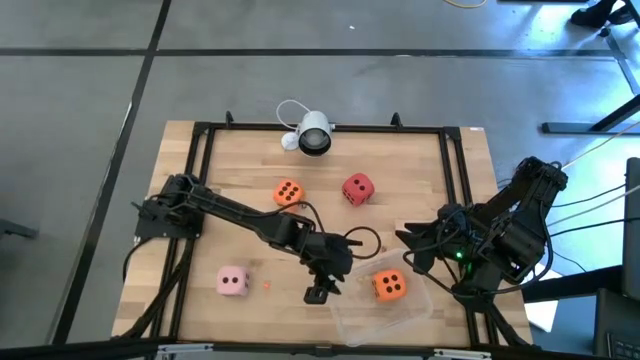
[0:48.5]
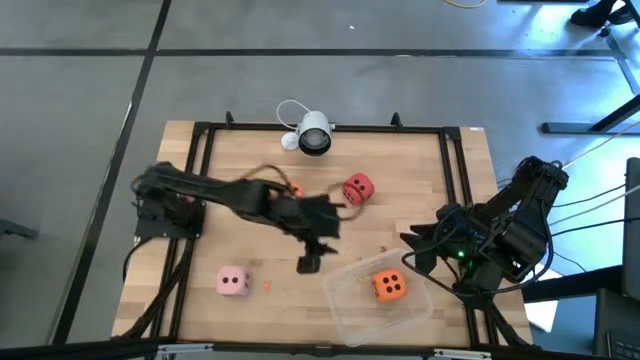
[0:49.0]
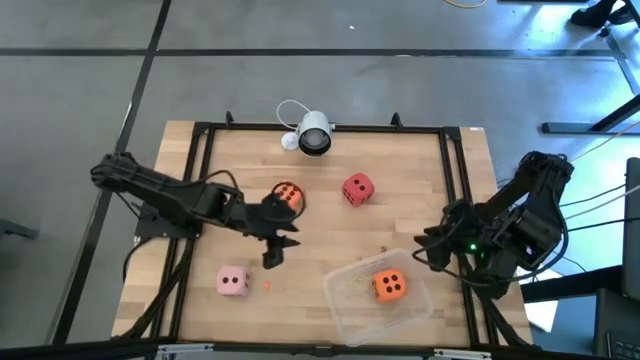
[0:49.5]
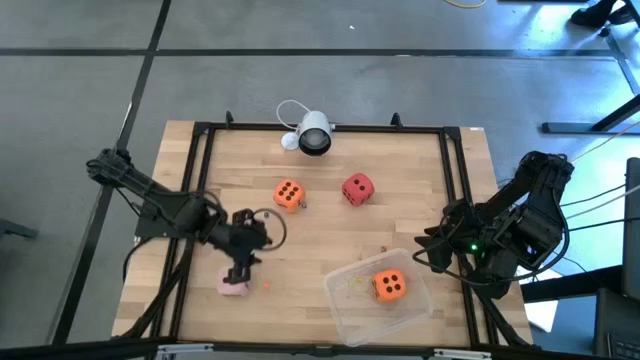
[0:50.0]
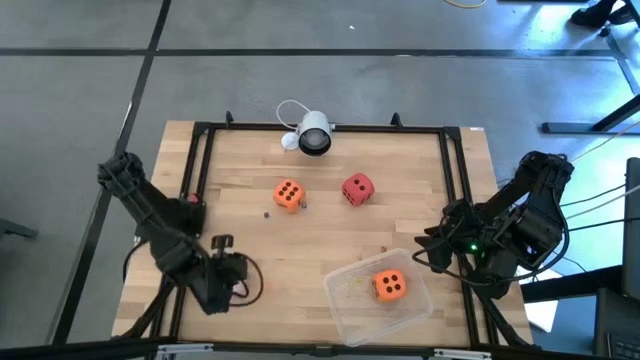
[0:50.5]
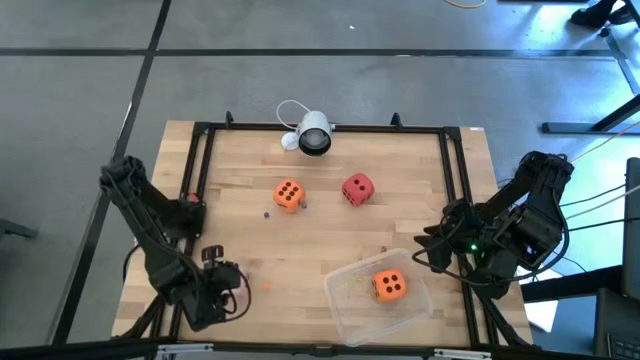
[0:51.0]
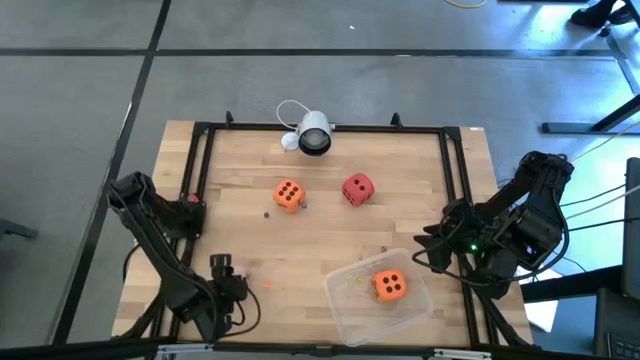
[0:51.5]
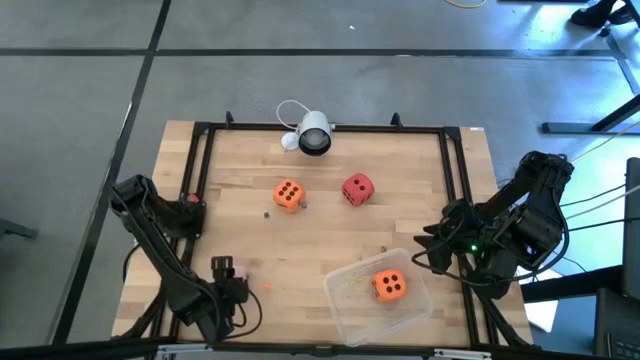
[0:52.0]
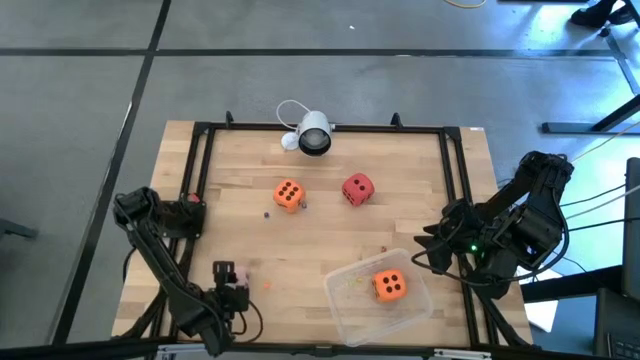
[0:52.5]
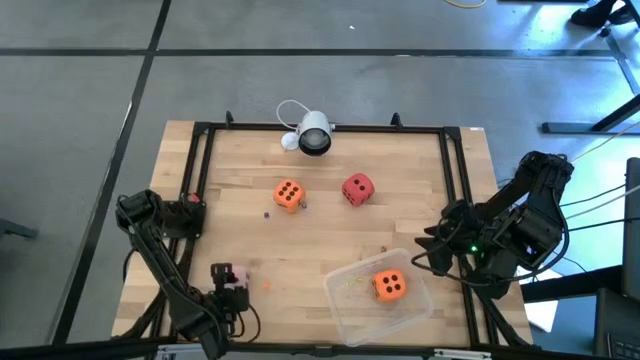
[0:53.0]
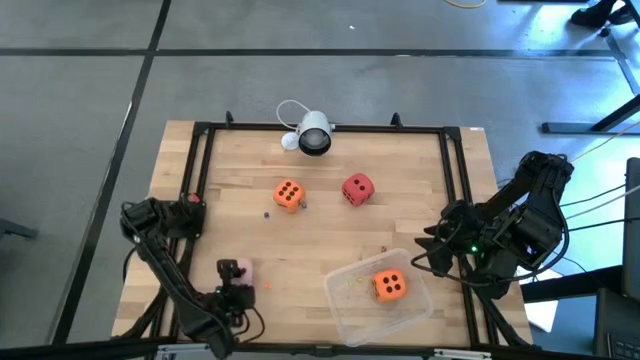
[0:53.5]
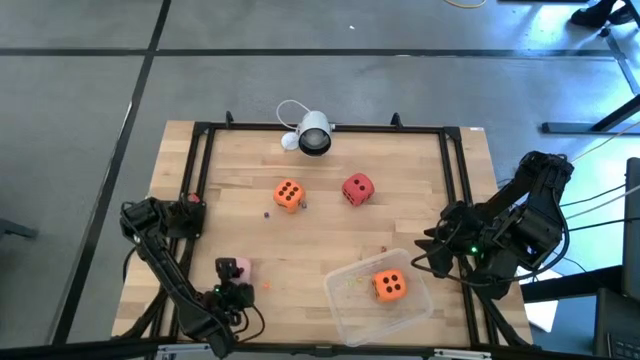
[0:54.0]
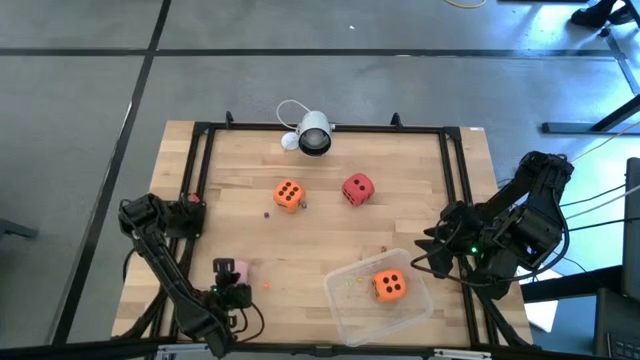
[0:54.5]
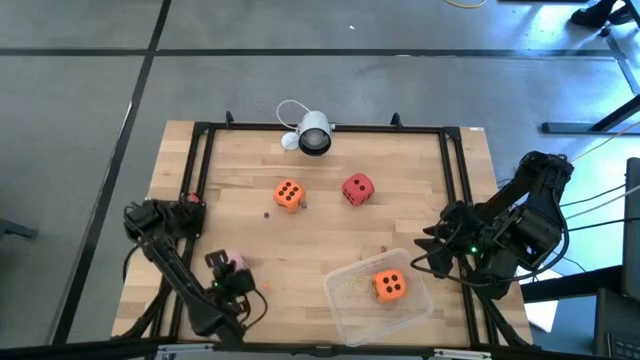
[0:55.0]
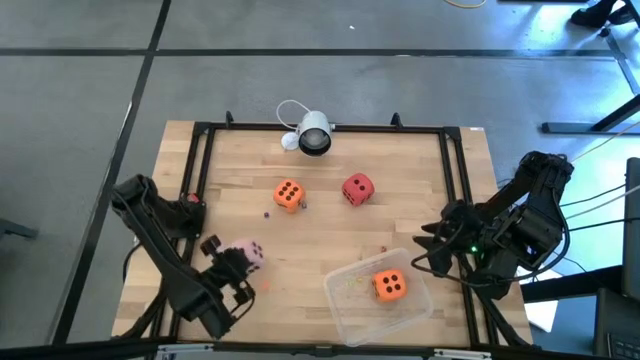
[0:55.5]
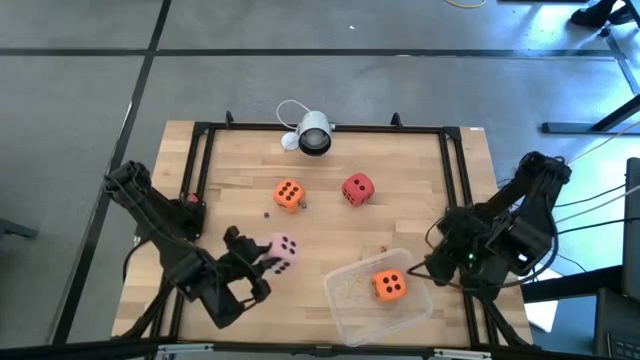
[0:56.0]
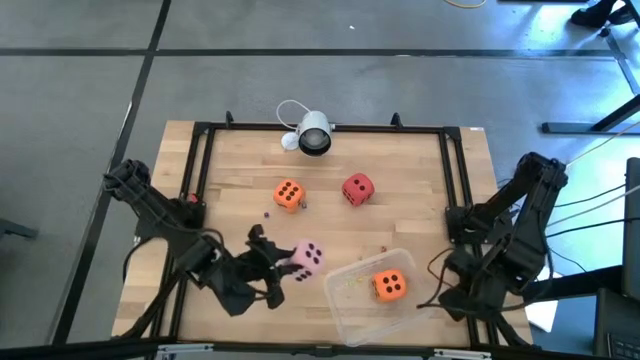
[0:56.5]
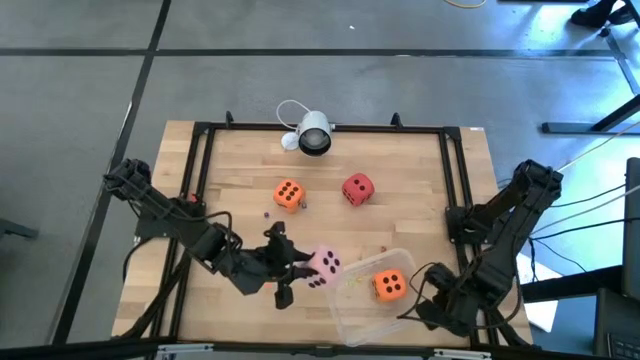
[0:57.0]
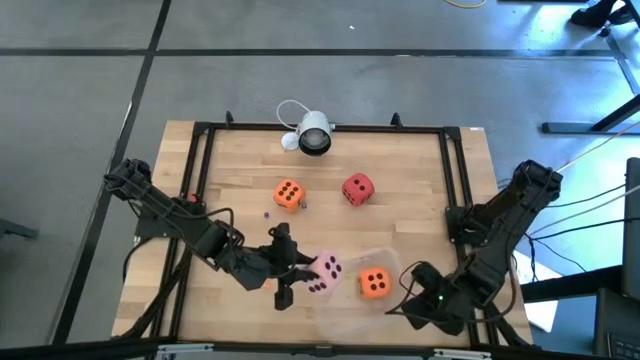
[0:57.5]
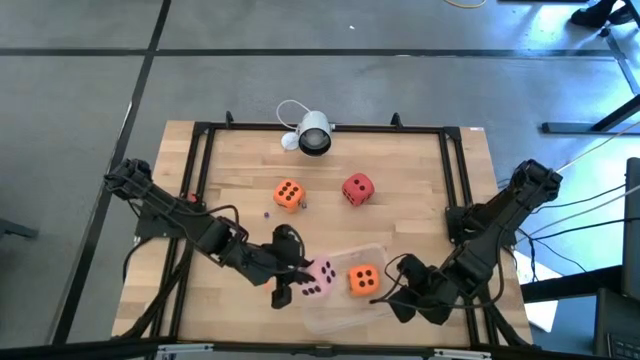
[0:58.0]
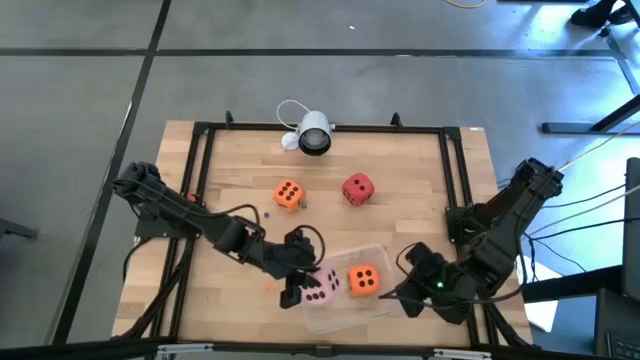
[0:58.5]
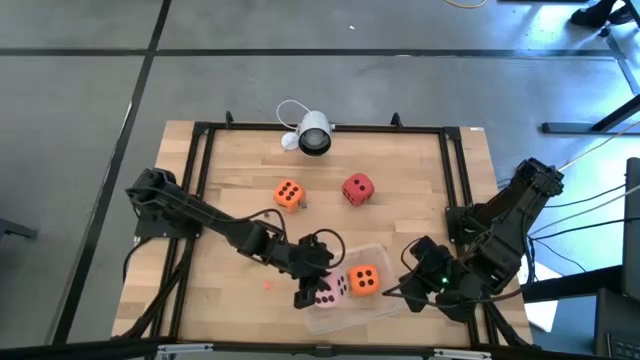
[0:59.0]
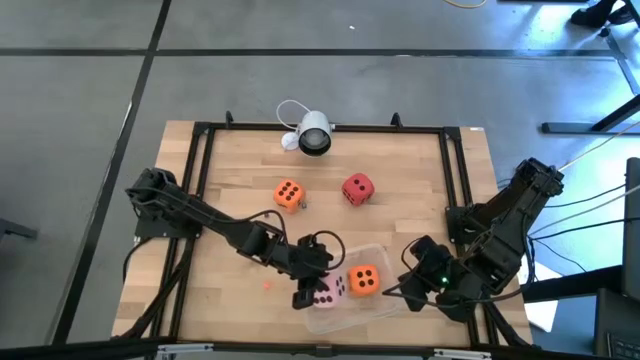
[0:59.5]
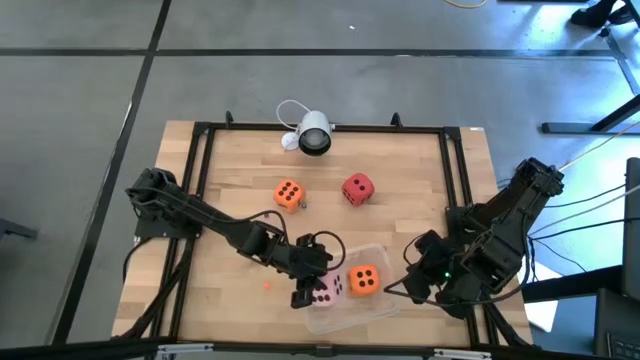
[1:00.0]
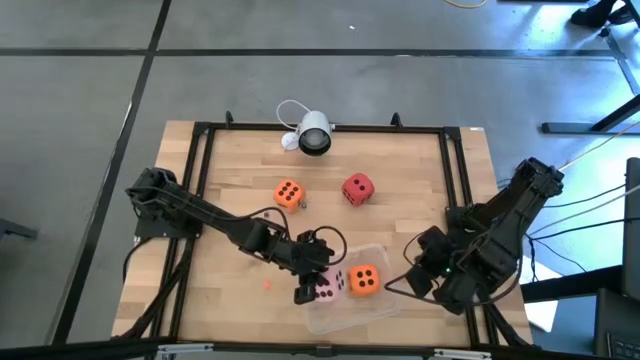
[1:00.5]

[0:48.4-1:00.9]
Task: Pick & Place Dice
Put the large pink die into the transparent bin

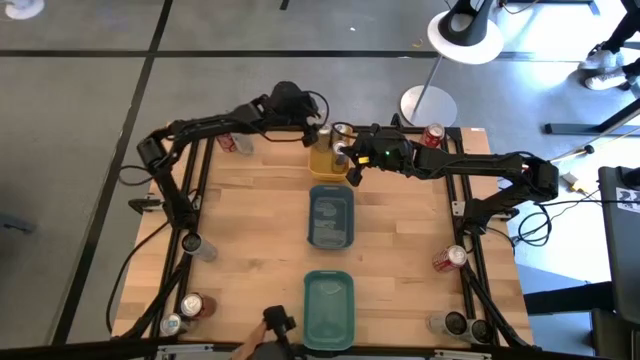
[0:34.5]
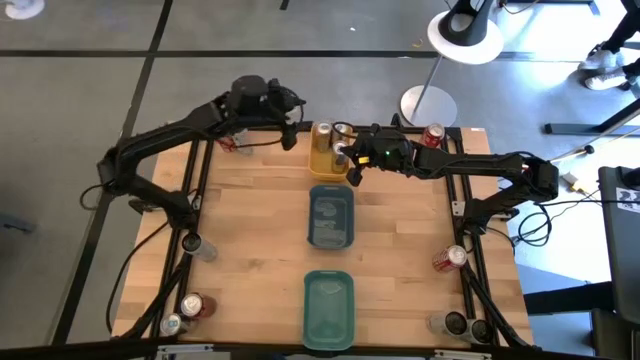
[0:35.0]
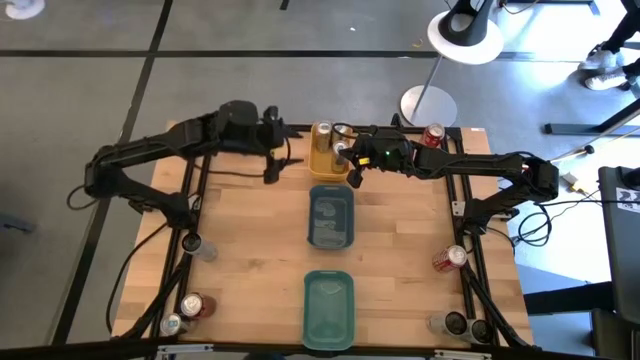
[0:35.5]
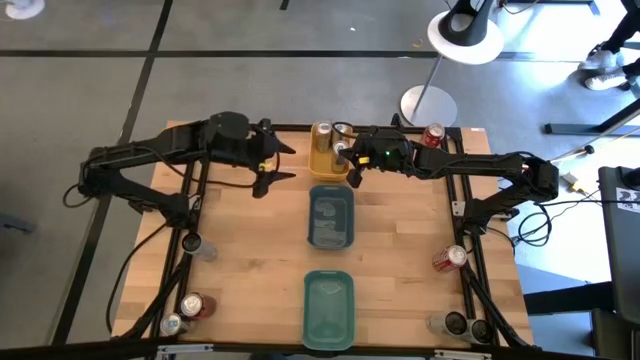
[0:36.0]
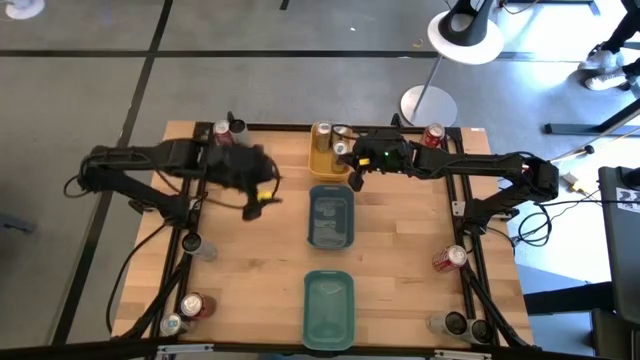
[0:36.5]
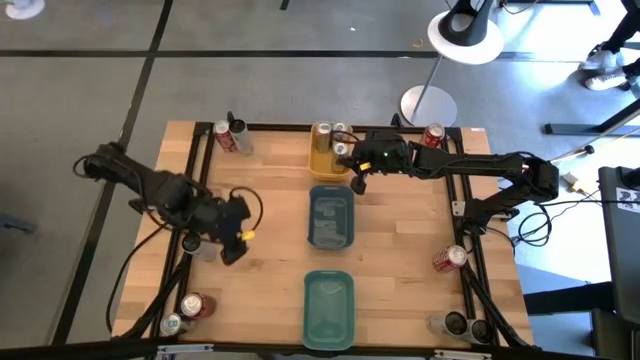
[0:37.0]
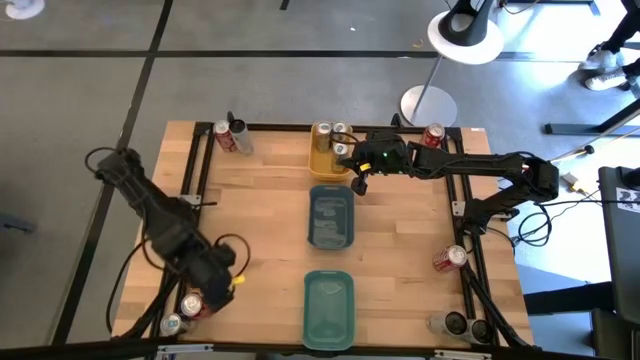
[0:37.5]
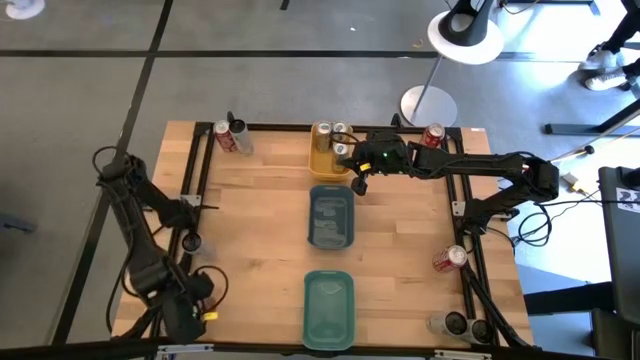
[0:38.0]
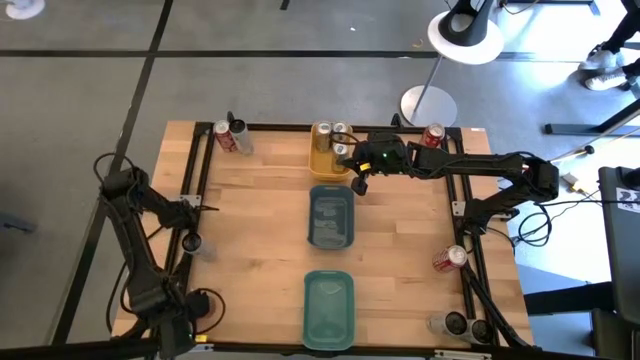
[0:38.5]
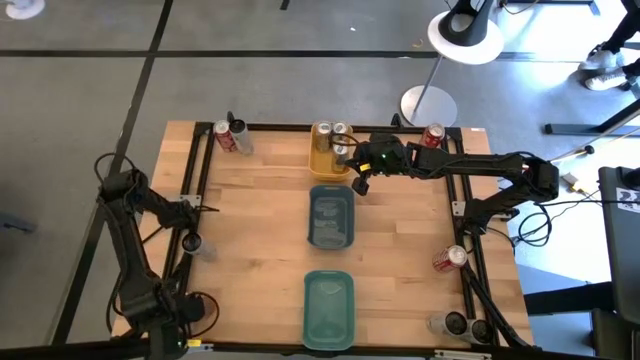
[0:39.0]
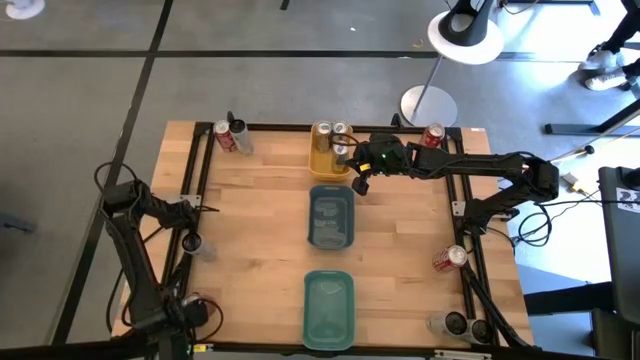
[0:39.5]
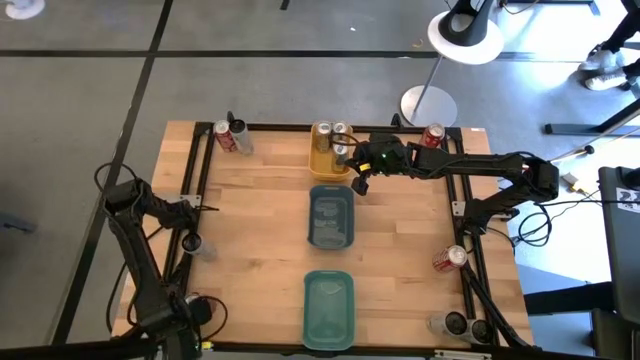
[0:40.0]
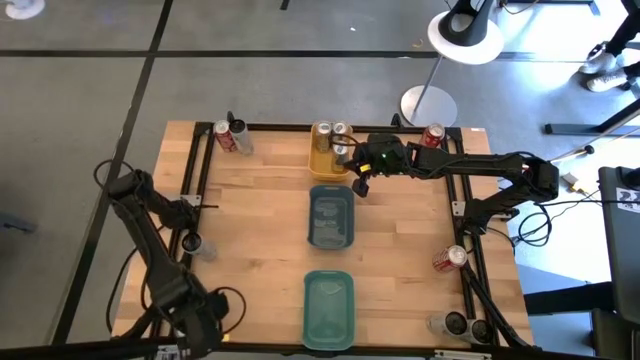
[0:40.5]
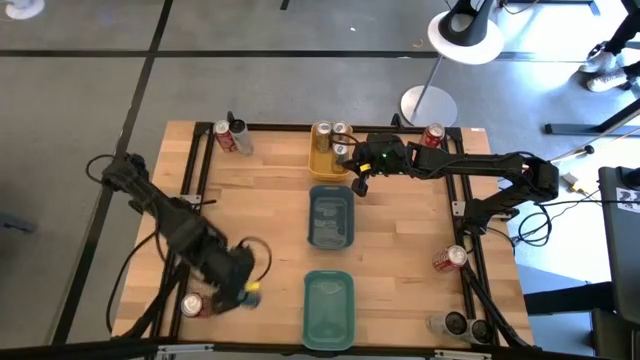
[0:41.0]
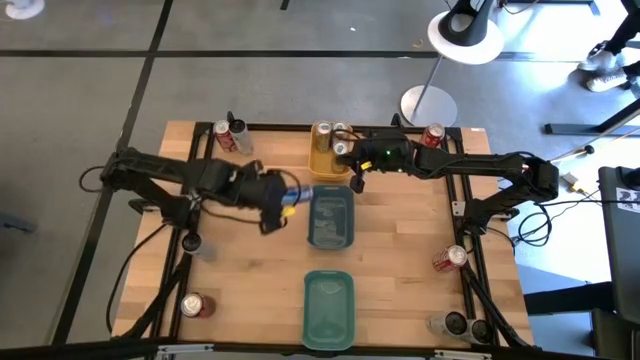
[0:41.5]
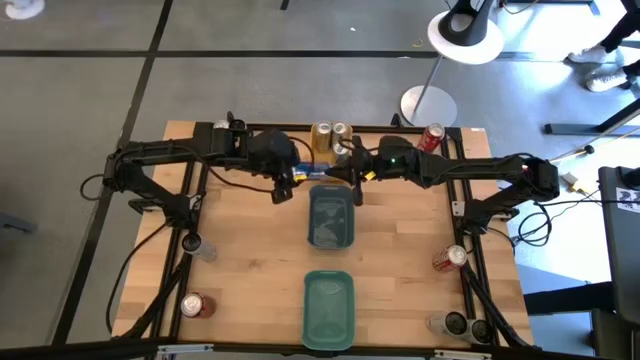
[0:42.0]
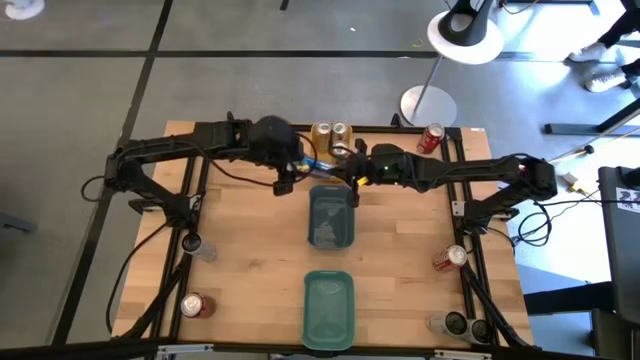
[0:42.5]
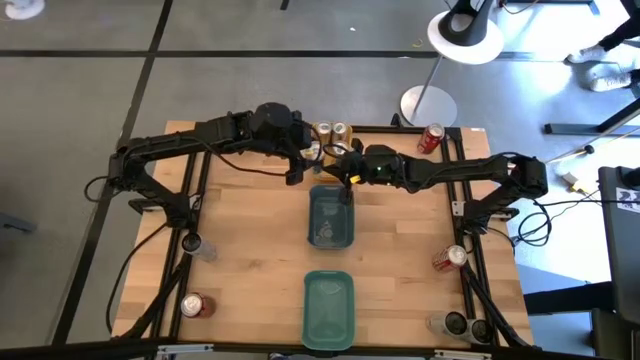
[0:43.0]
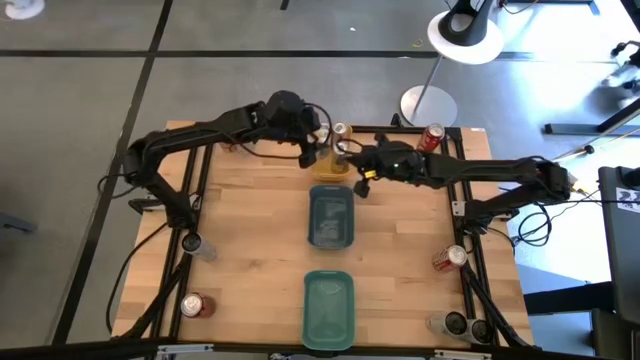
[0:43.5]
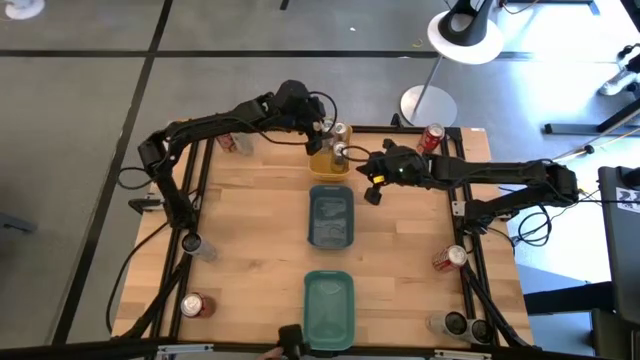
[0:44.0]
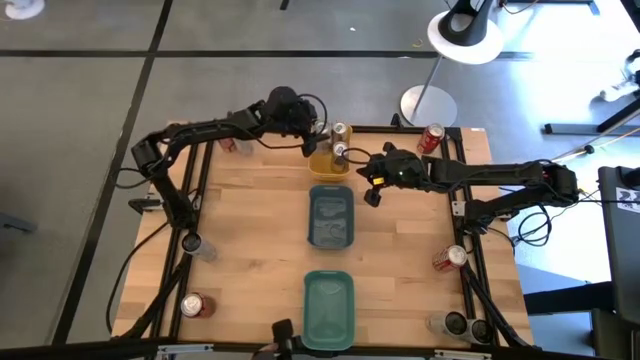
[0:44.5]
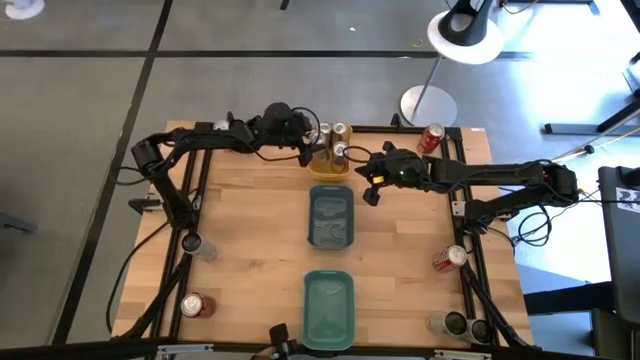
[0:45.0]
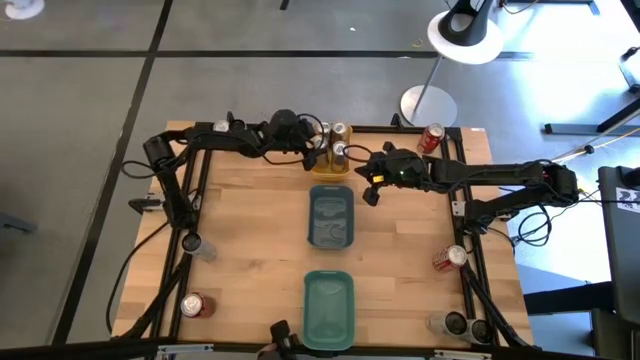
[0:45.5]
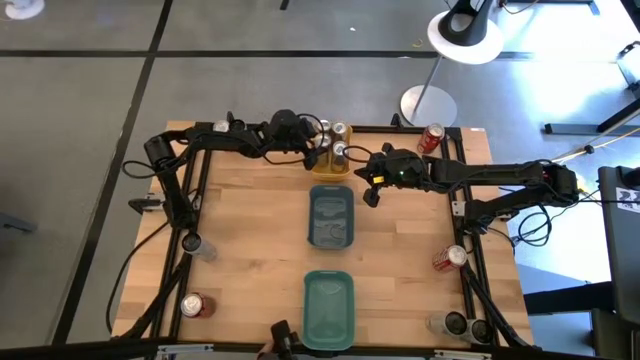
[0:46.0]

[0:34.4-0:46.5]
Task: Sort soda cans
Put the blue soda can into the yellow bin
